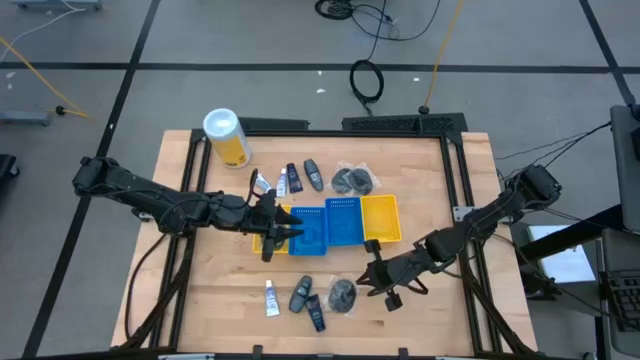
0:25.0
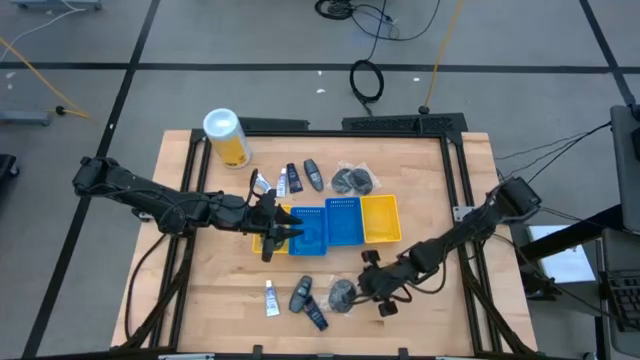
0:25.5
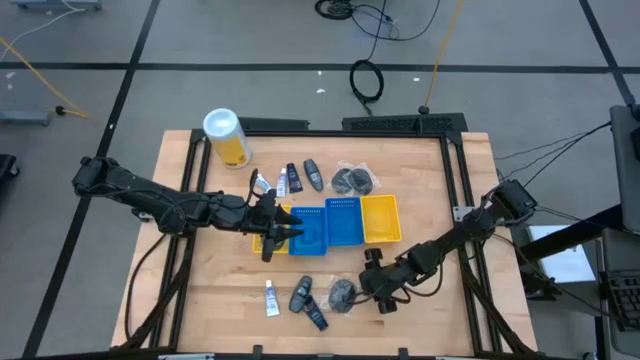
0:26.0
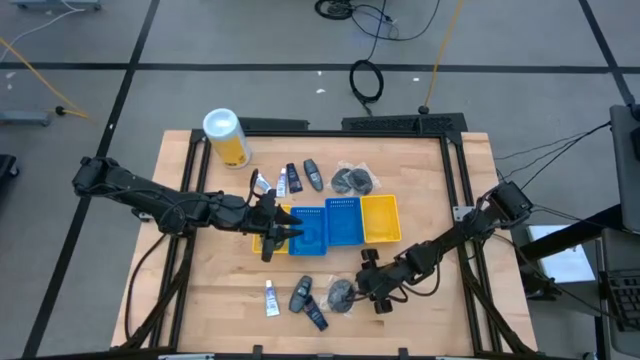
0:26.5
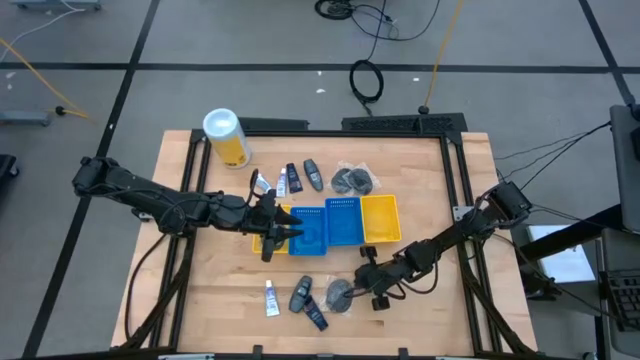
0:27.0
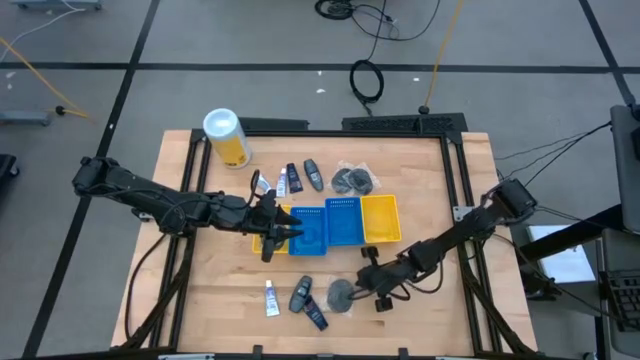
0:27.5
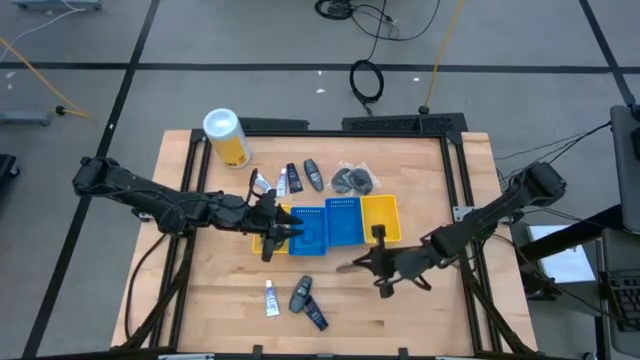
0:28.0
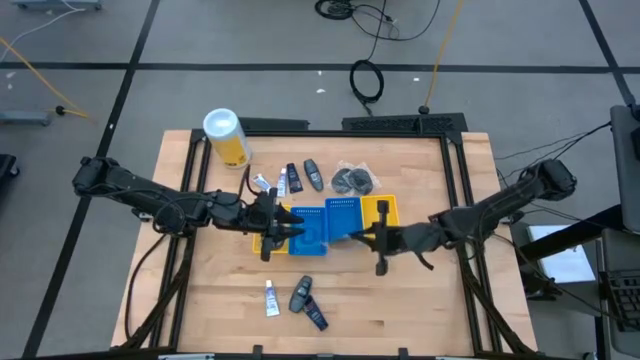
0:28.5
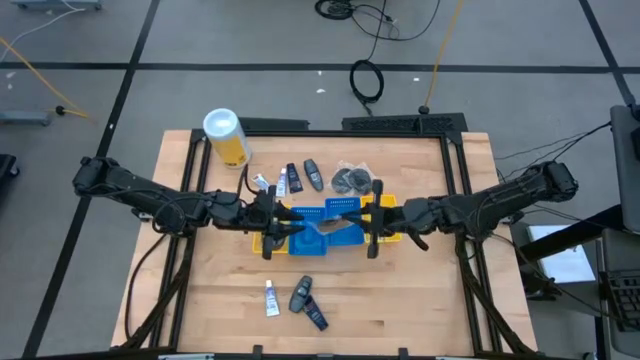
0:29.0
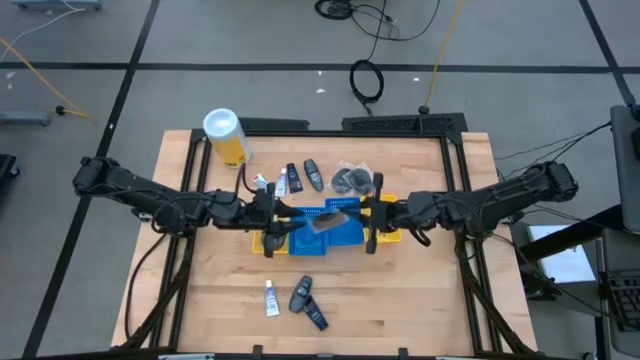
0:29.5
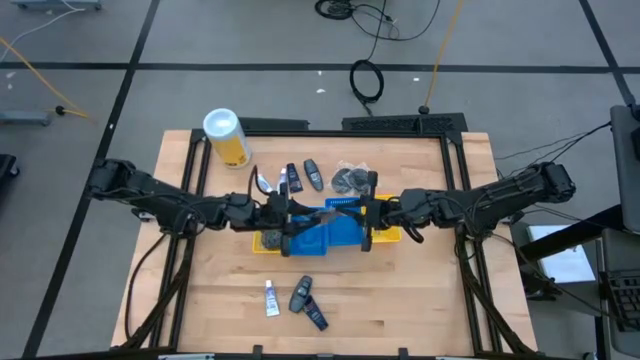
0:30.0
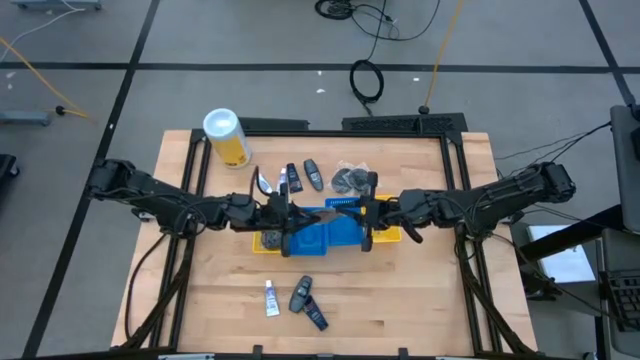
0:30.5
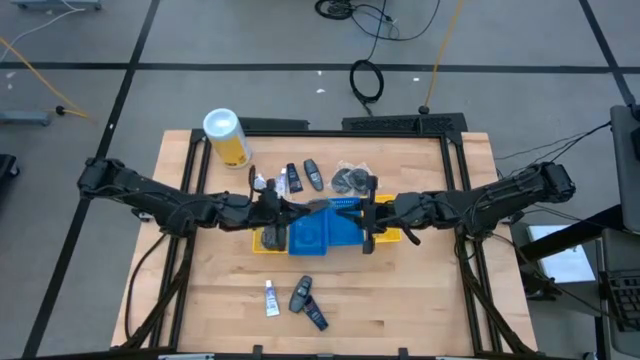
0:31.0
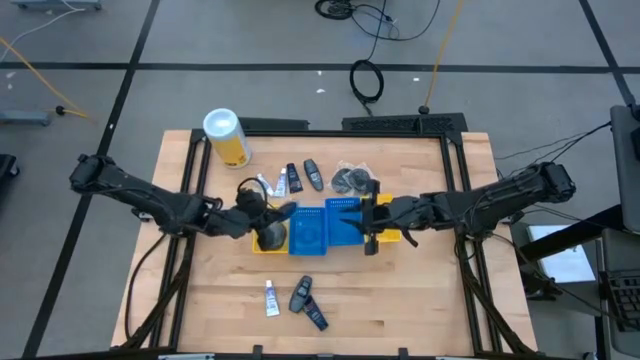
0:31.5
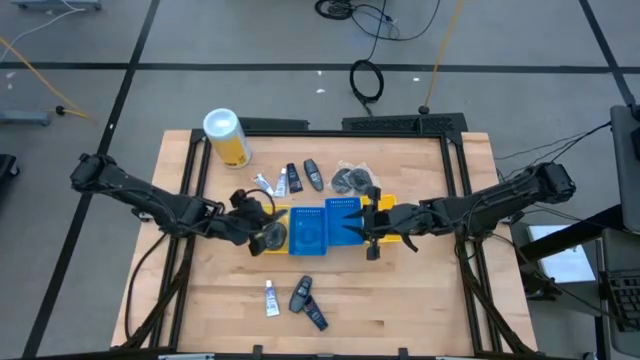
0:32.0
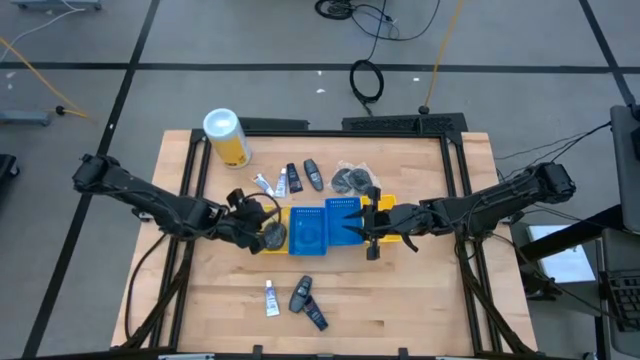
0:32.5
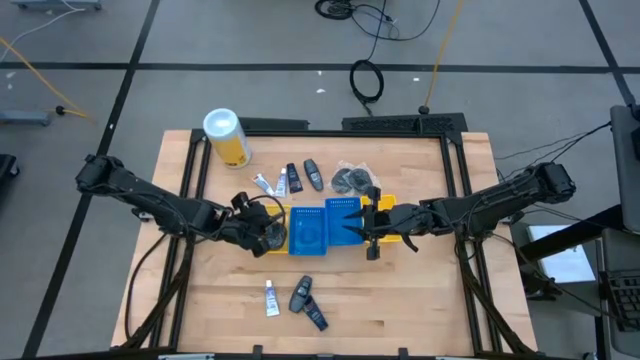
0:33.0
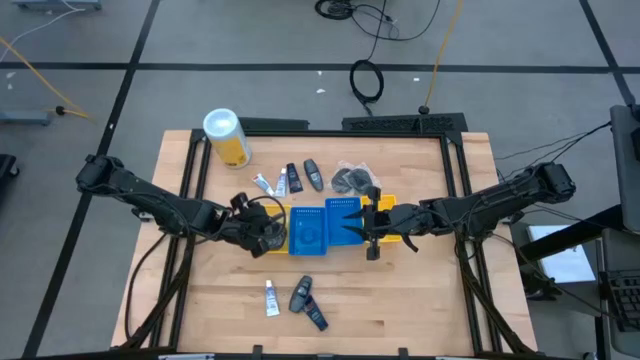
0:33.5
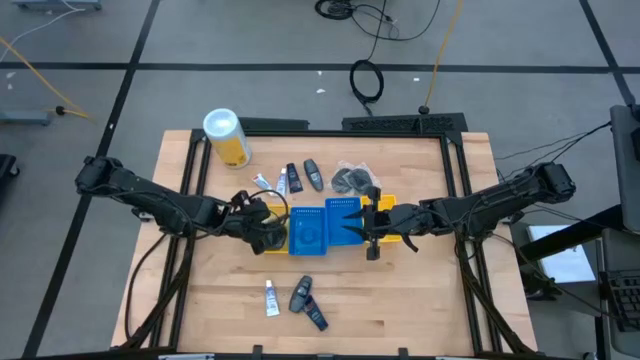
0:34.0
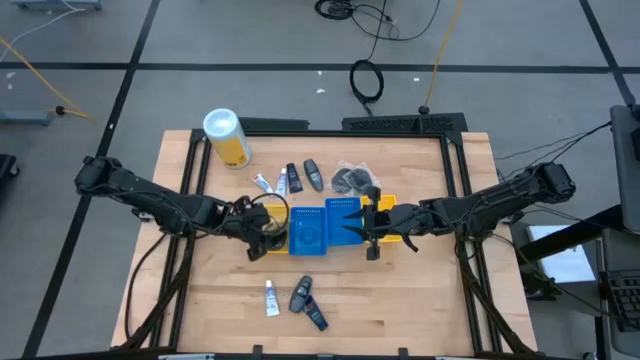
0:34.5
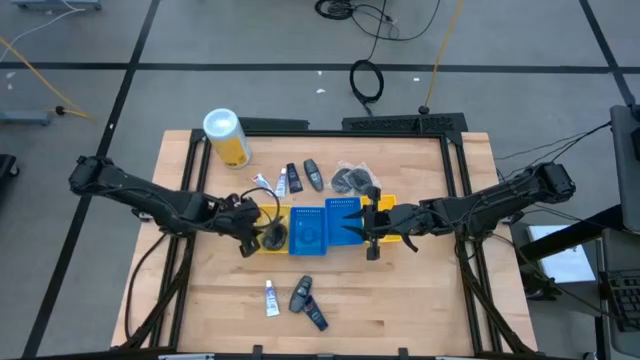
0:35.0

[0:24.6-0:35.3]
Task: Pick & Place Travel size toiletries
Put the hairbrush into the left yellow bin

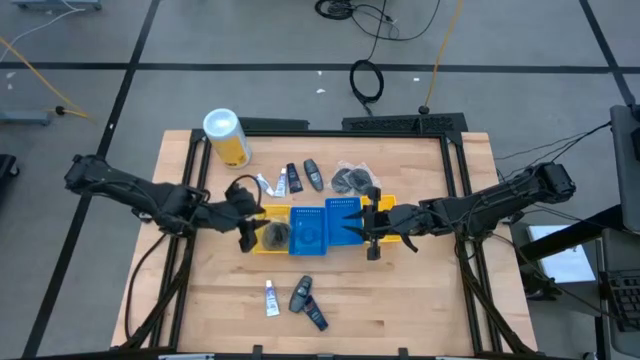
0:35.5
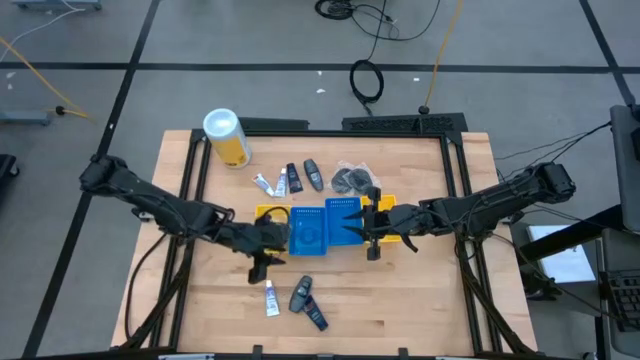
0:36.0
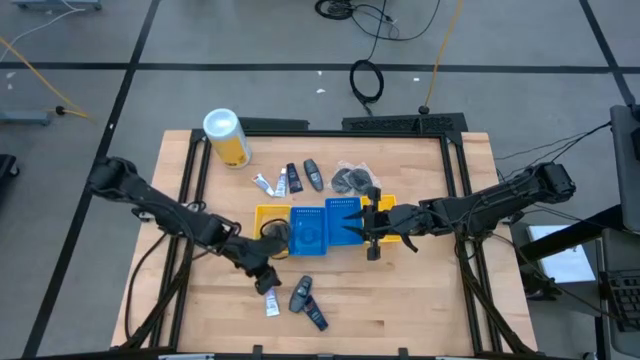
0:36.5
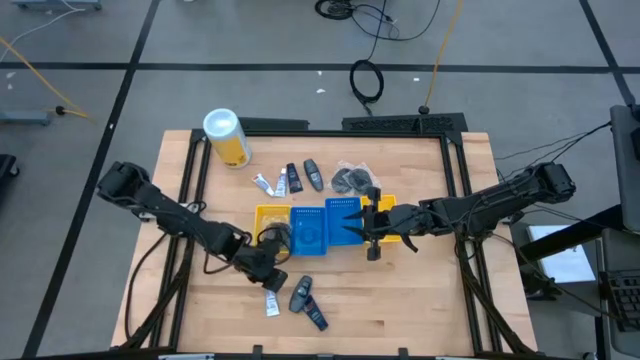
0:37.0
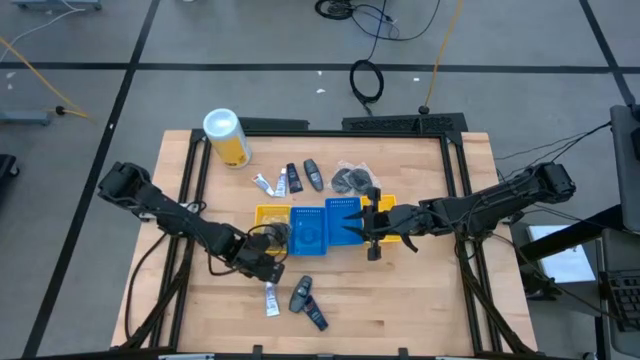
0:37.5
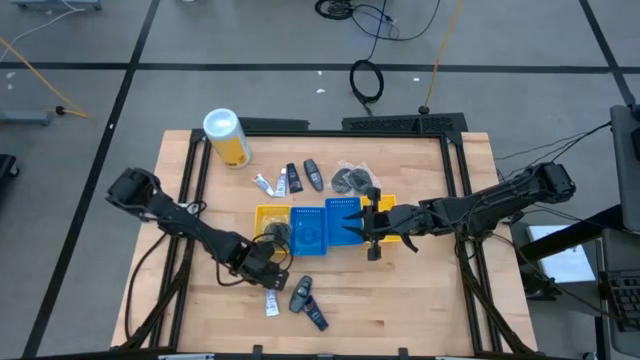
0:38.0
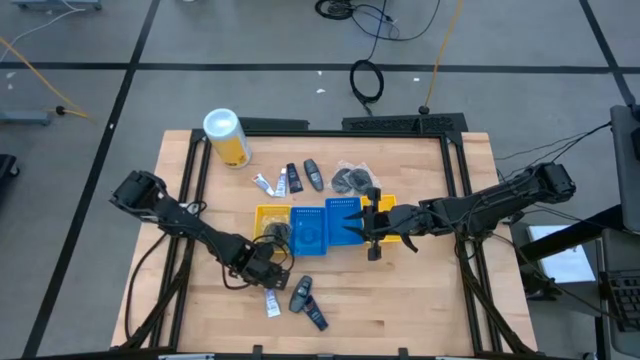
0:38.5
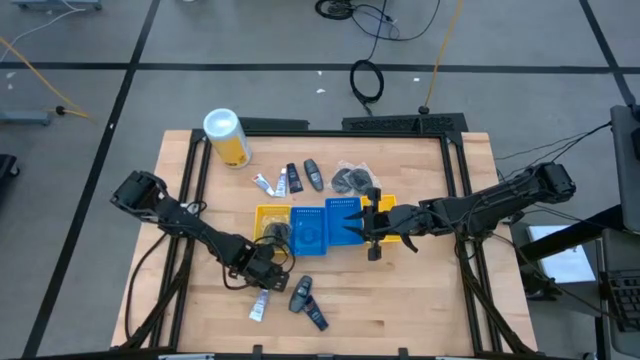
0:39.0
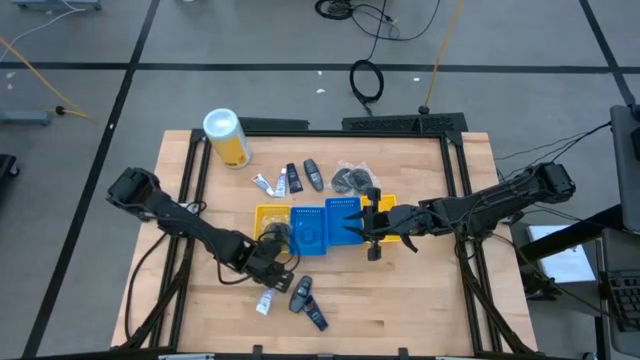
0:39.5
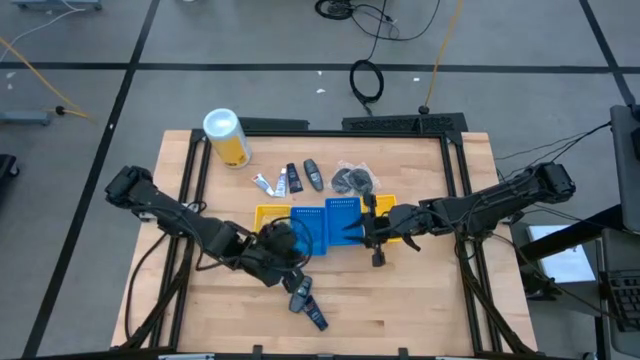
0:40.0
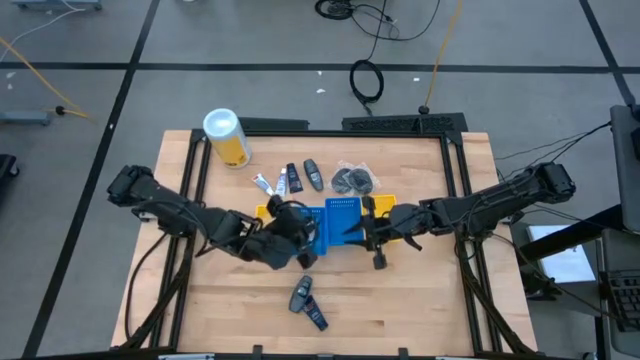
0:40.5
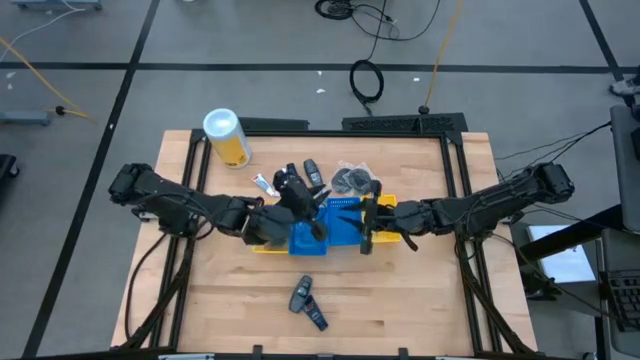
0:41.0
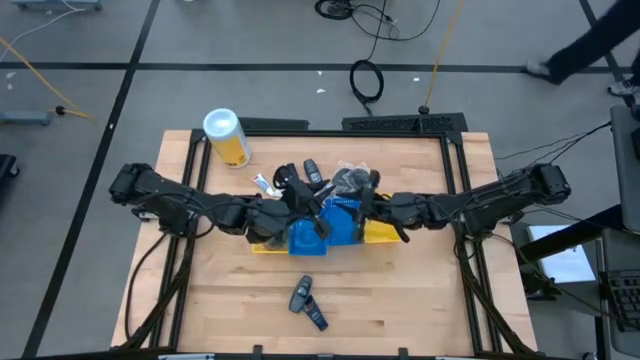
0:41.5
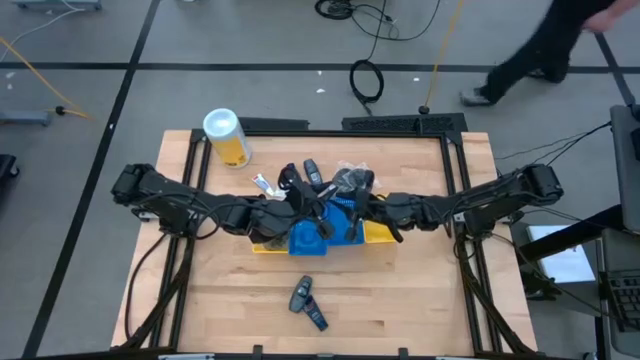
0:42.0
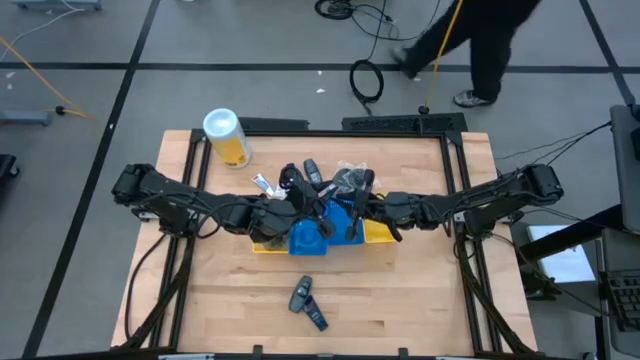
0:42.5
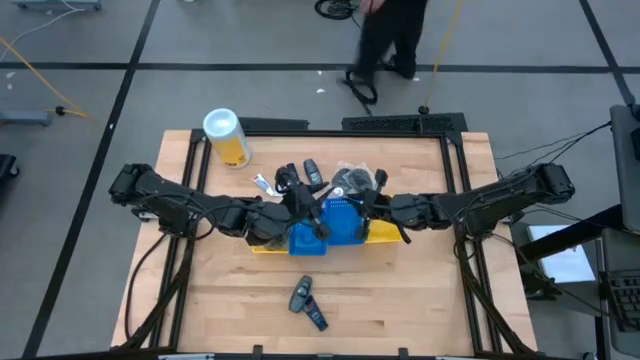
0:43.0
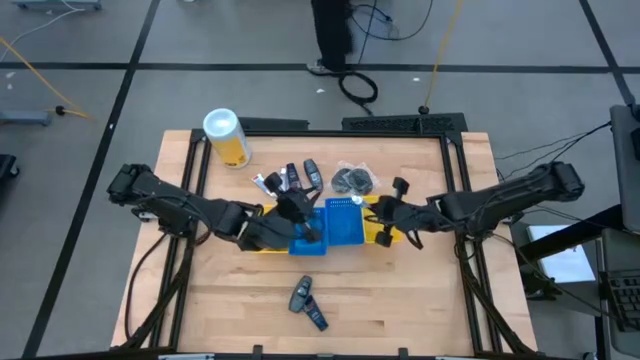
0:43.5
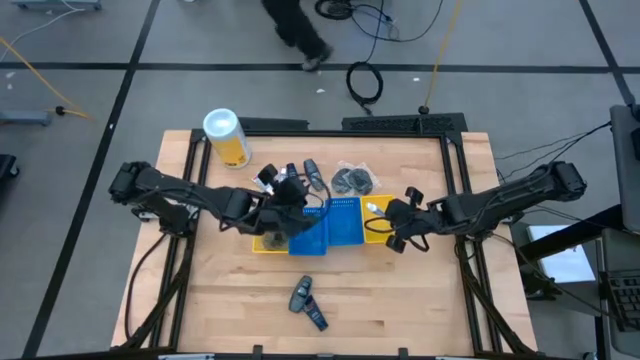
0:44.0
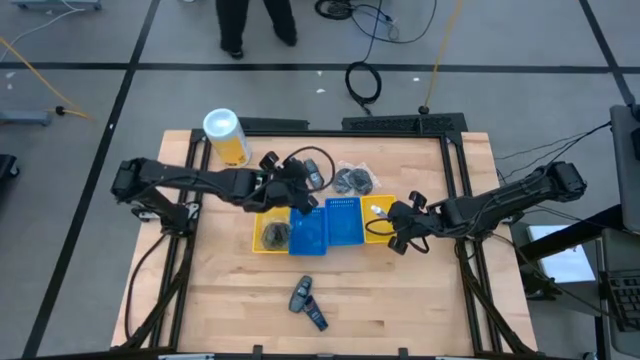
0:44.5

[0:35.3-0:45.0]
Put the toothpaste into the right yellow bin

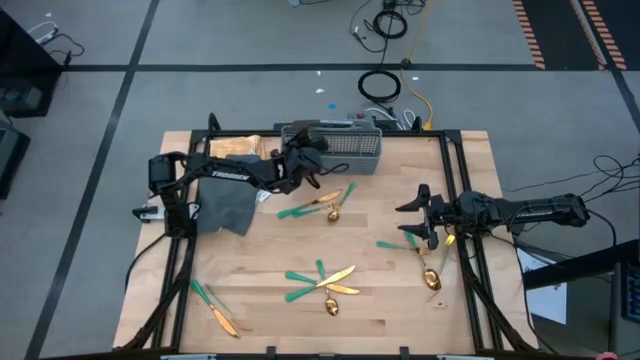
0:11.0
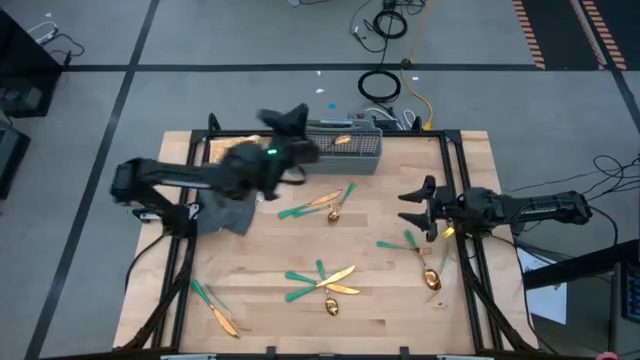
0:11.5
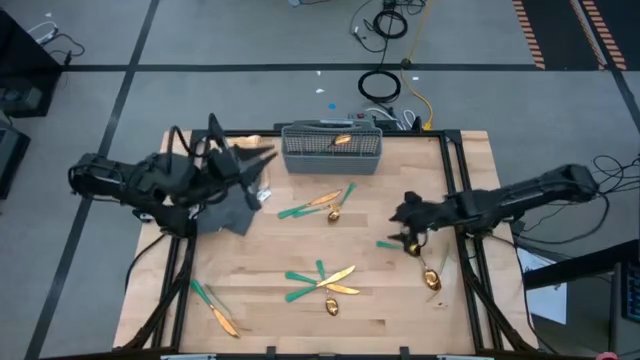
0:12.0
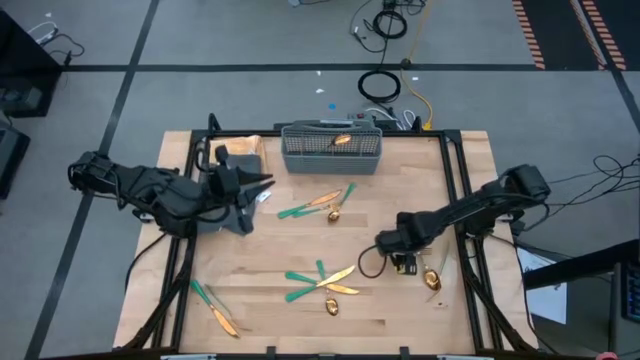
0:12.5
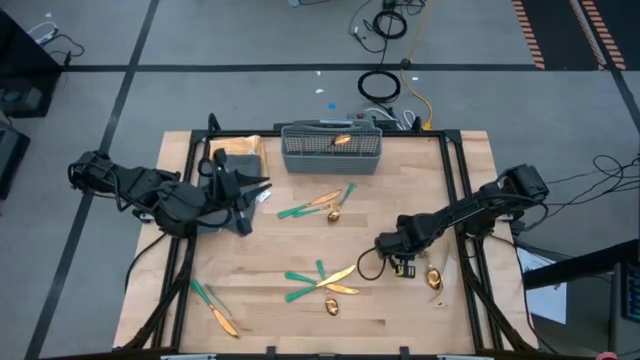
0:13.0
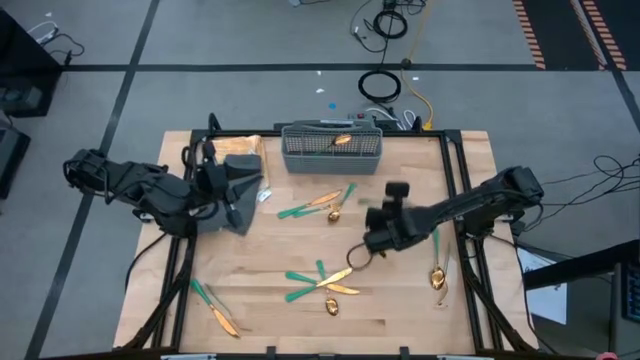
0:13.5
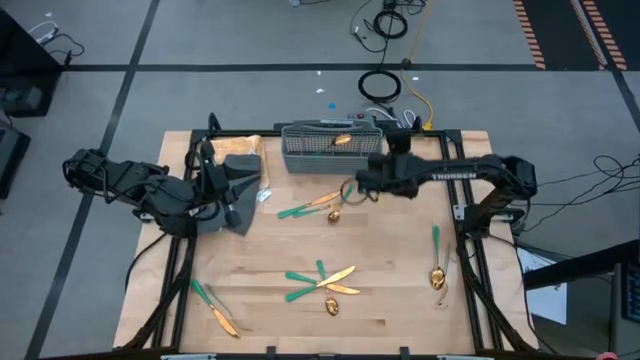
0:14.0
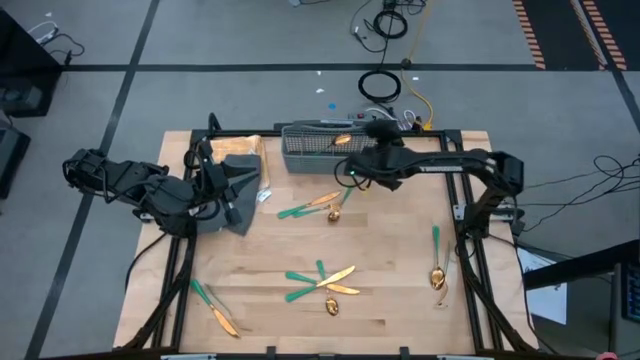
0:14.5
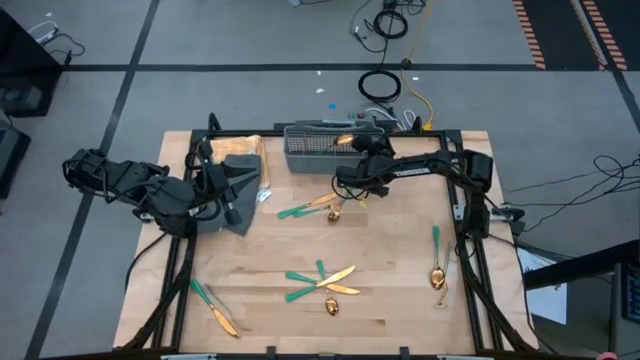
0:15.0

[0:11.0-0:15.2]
Task: Sort silverware
Put the green fork into the gray silverware basket
